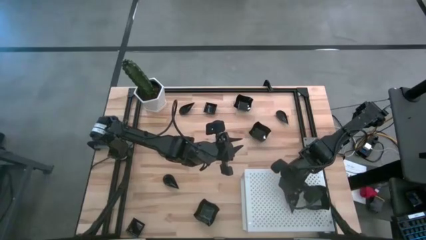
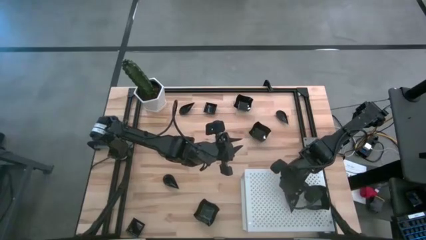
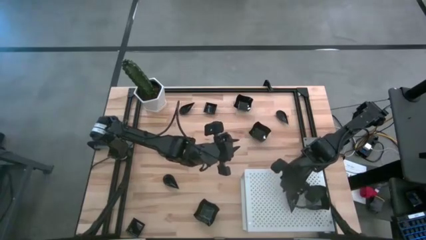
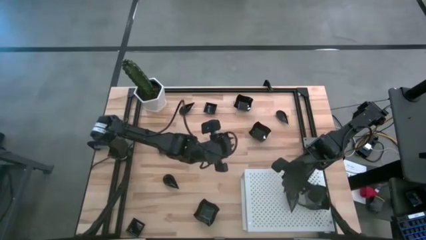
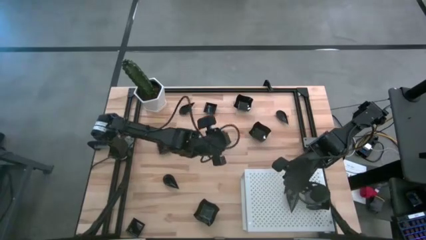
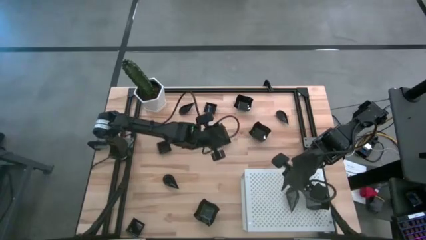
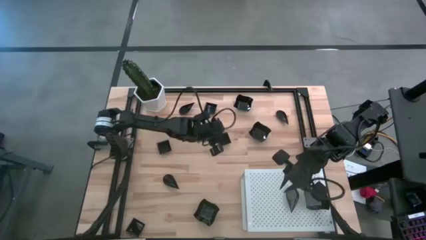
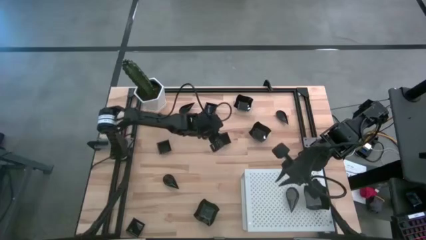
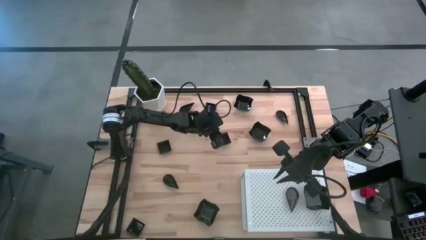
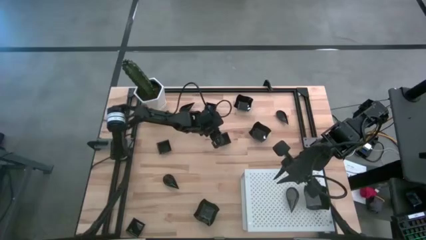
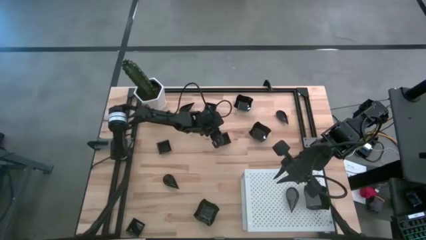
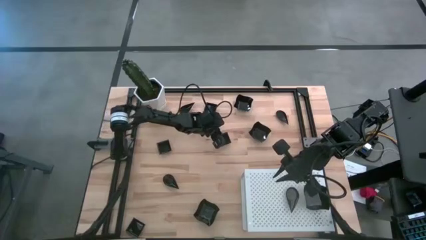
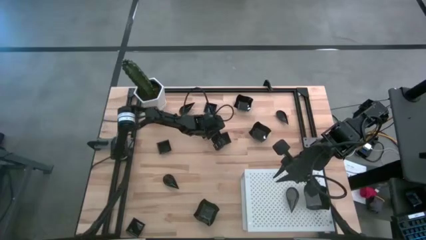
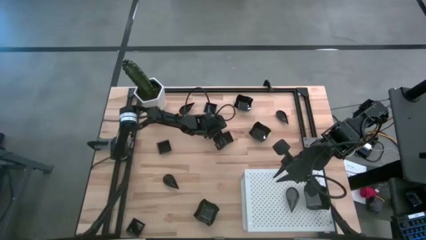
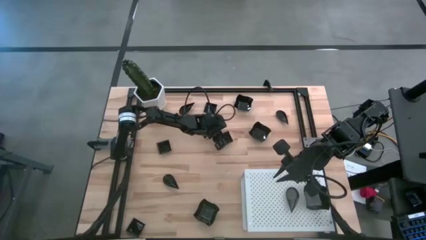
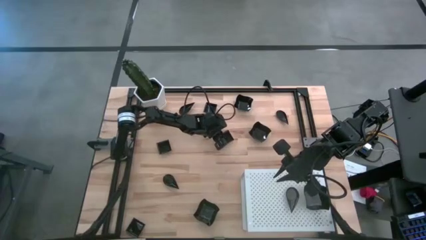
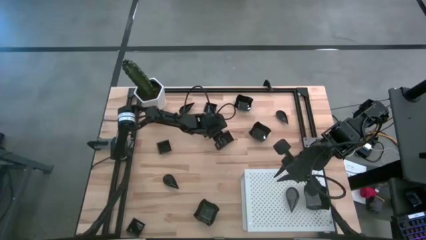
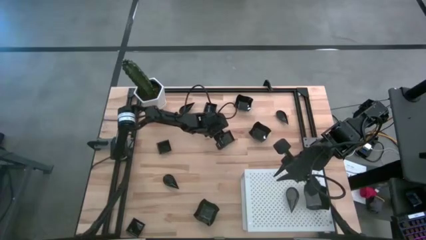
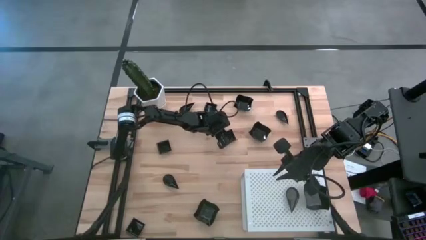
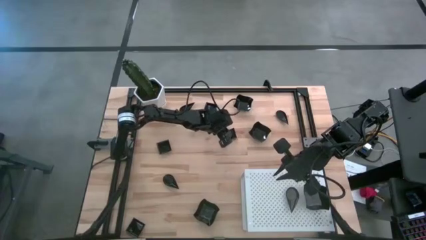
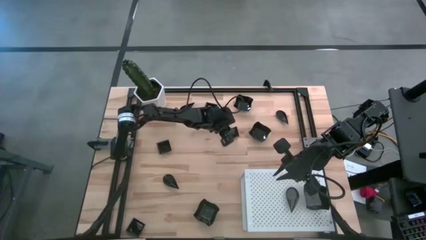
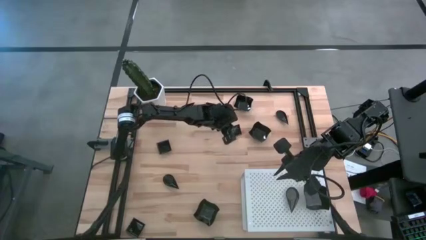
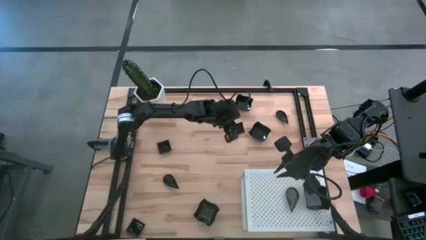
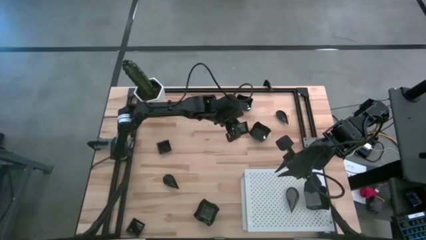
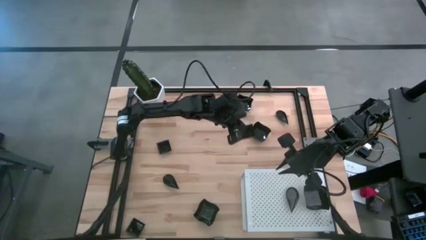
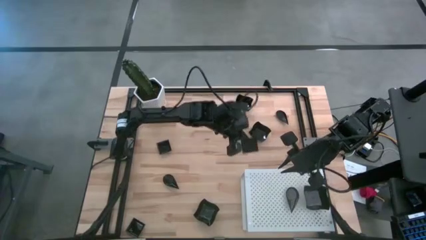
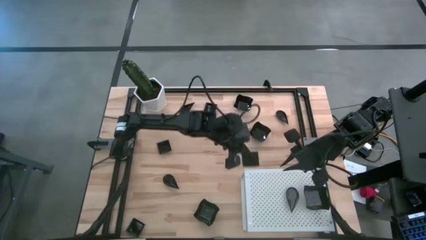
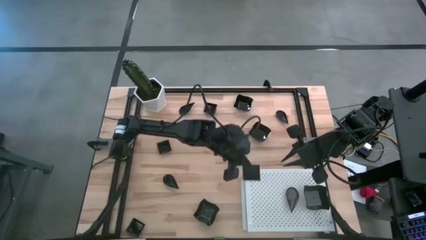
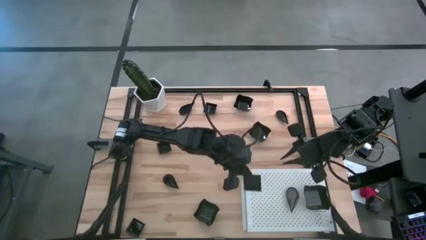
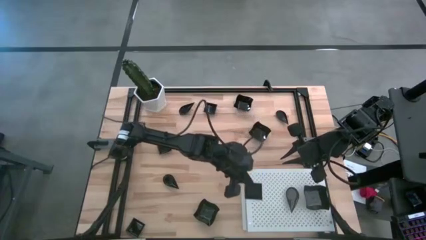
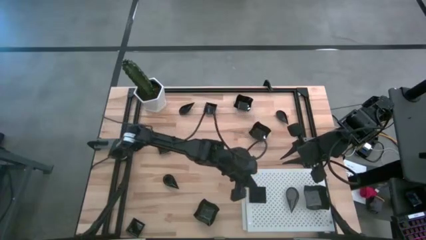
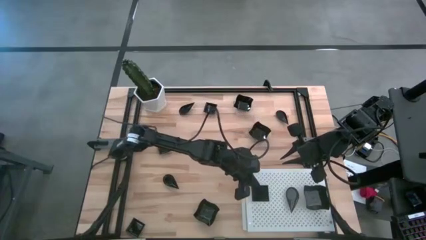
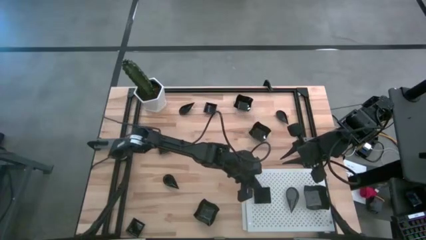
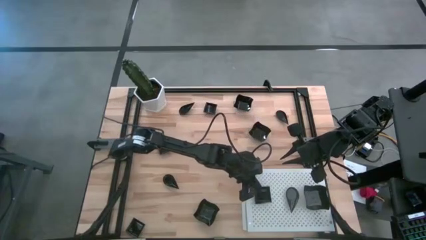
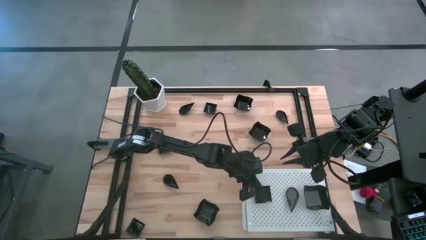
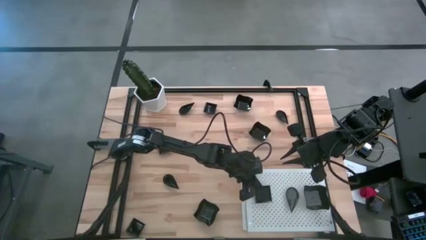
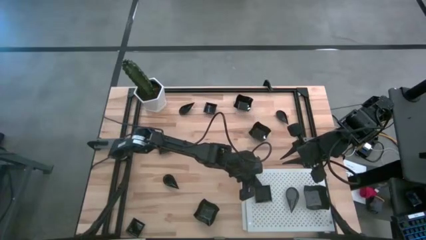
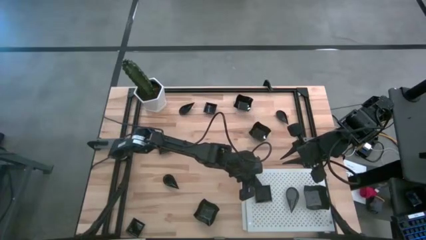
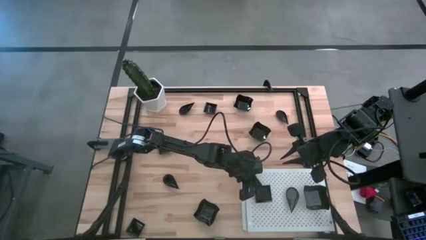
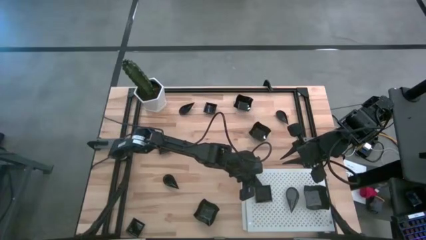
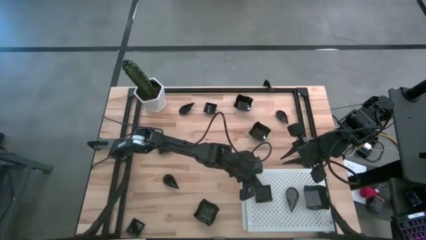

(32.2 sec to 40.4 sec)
Task: Pick & Place Mini shaped plates
Put the square plate on the shelf

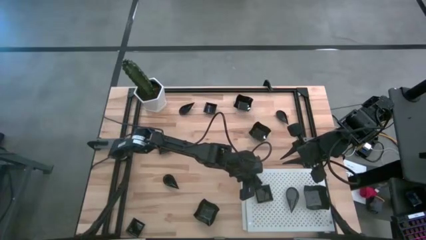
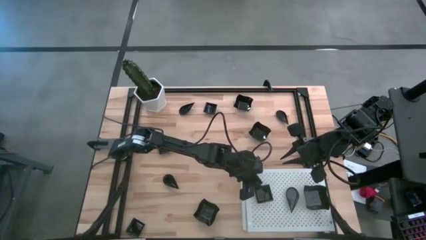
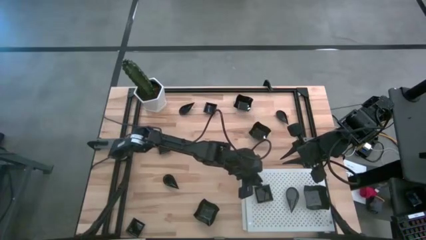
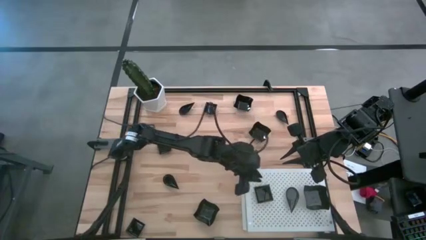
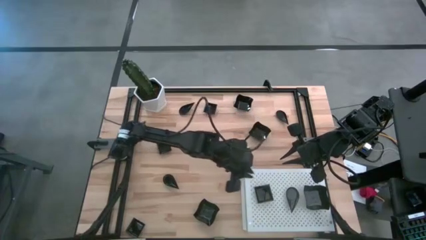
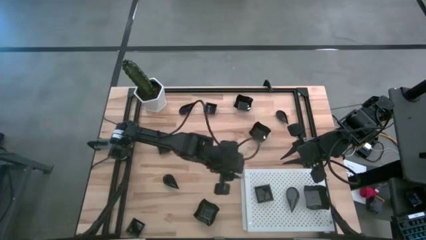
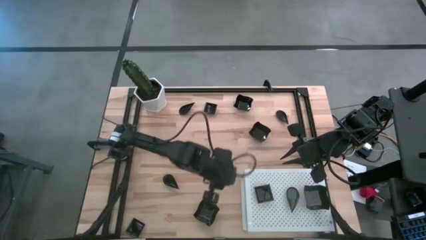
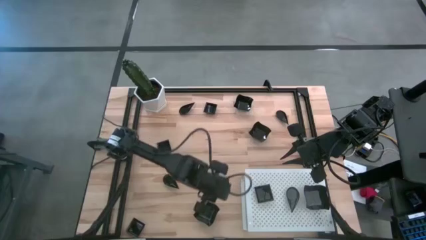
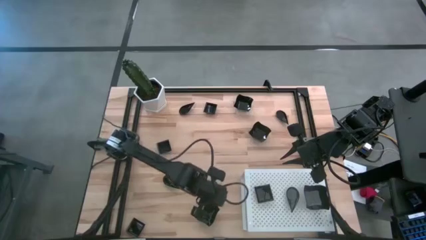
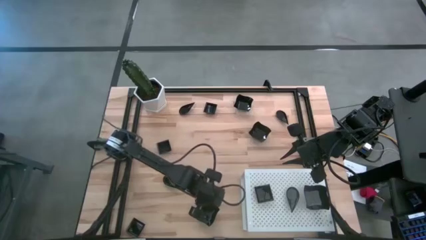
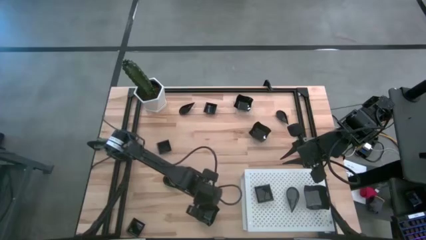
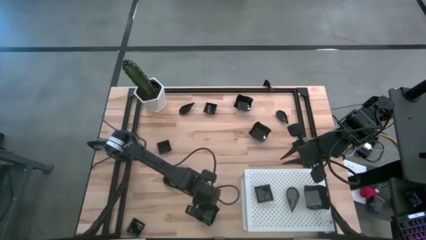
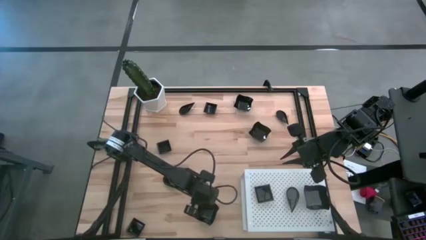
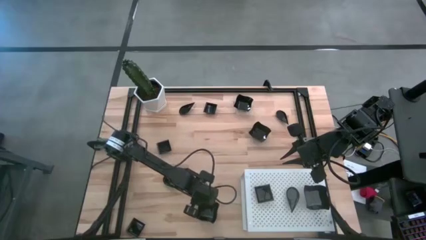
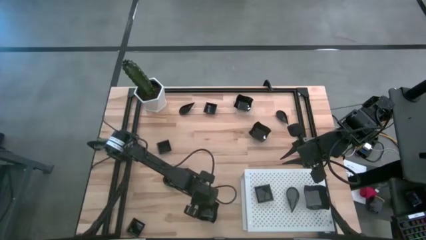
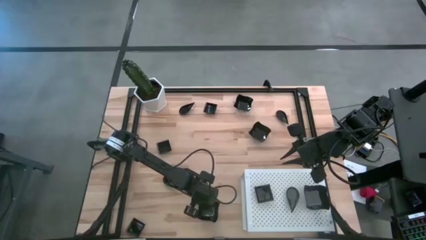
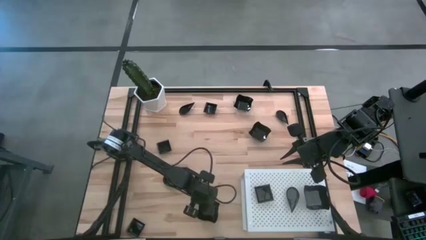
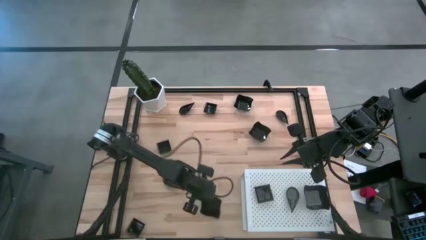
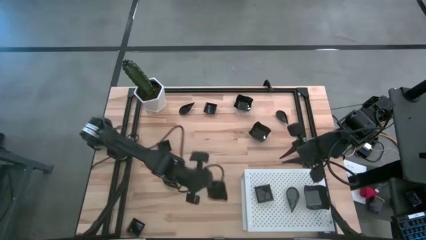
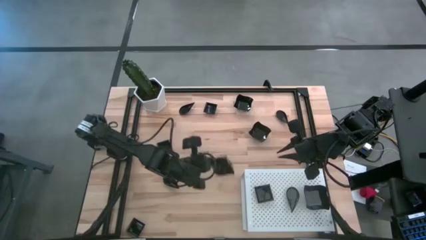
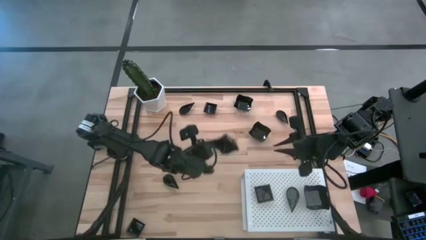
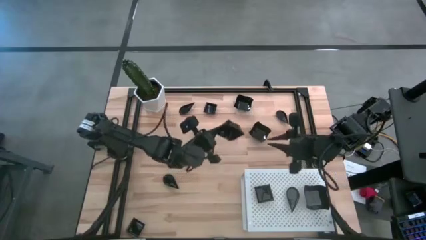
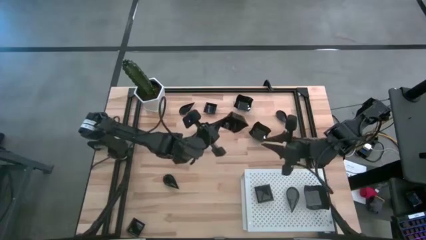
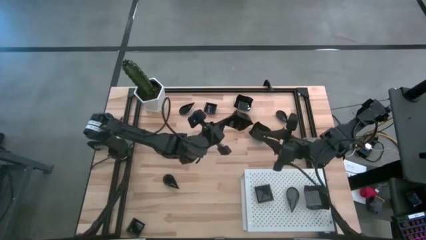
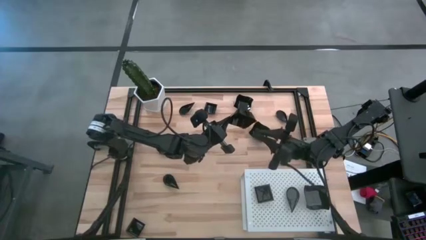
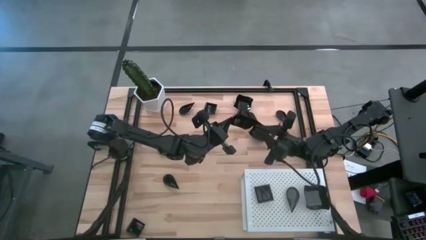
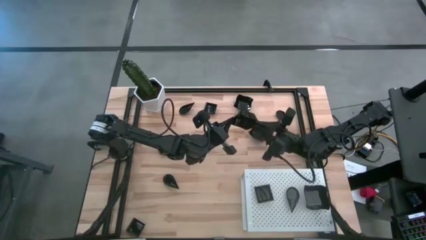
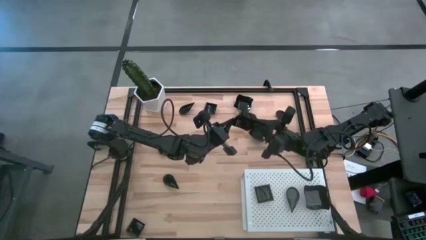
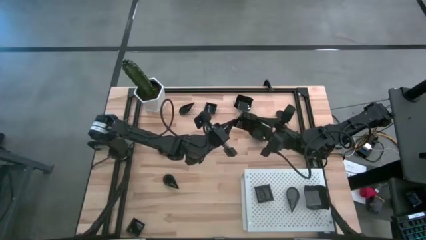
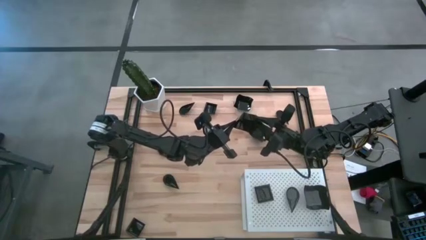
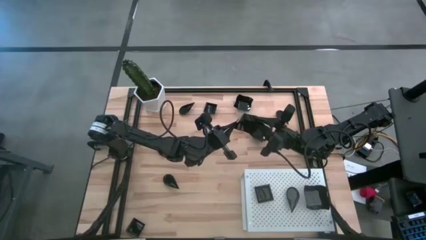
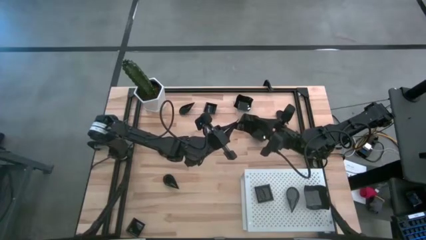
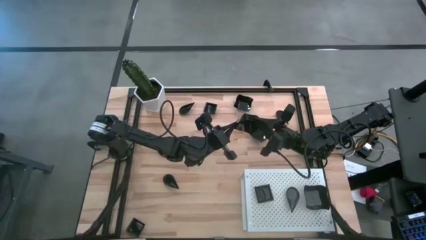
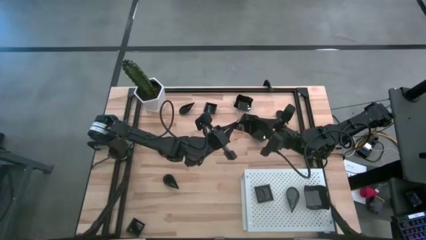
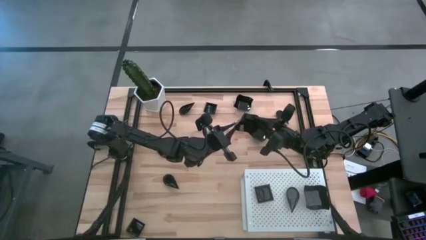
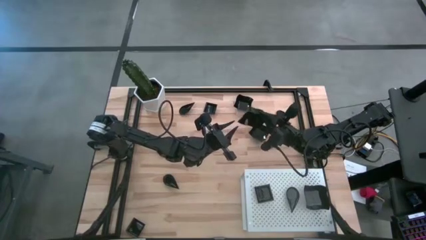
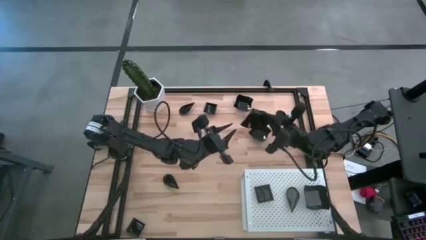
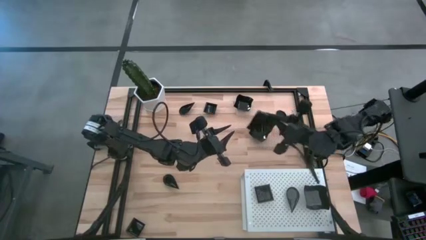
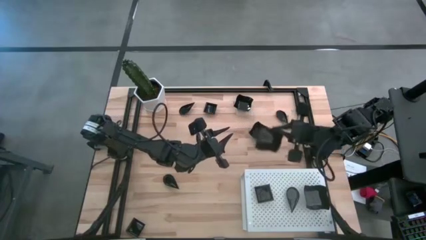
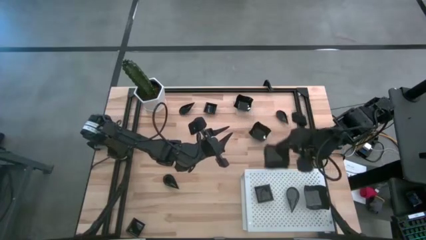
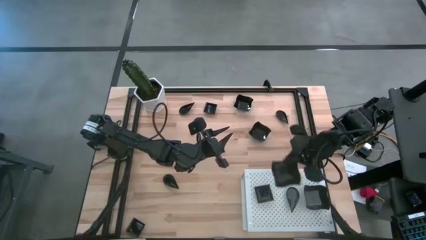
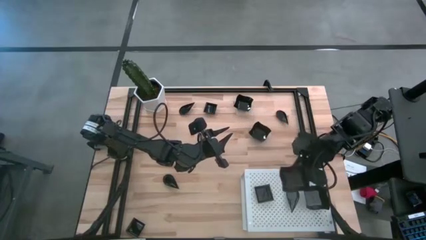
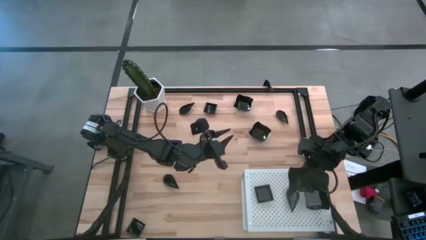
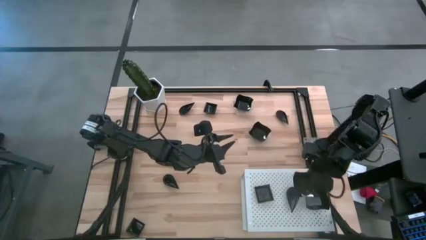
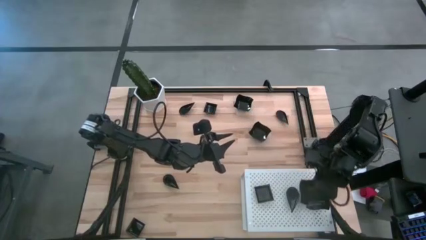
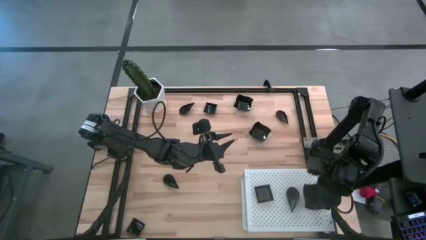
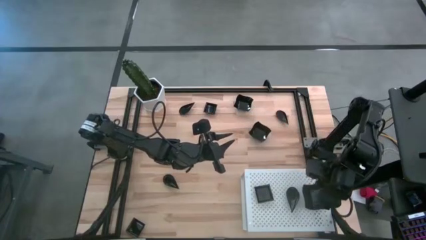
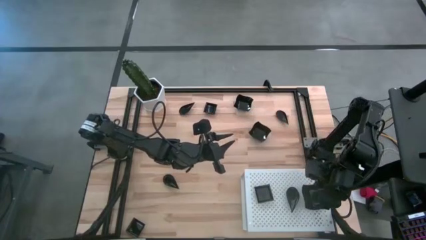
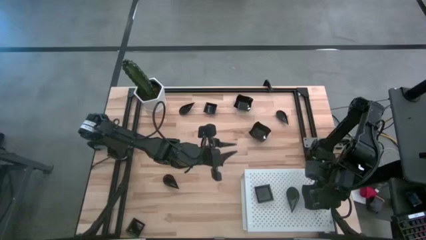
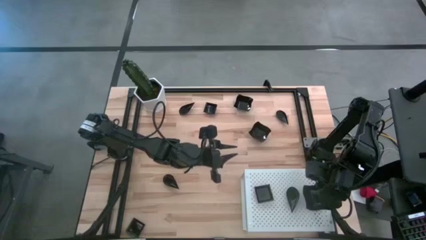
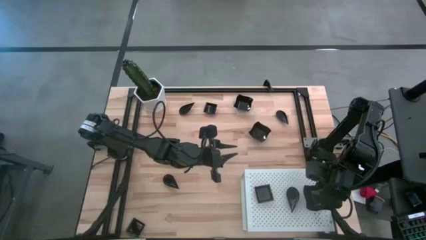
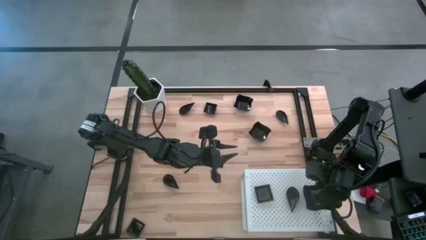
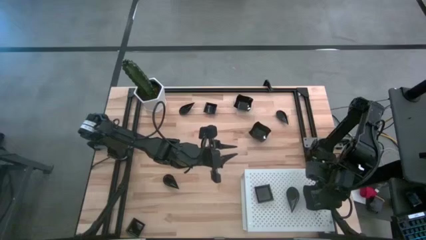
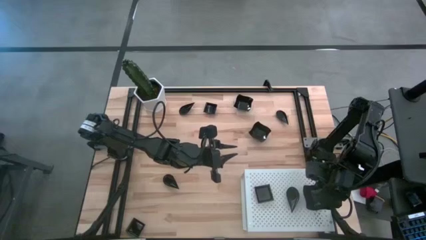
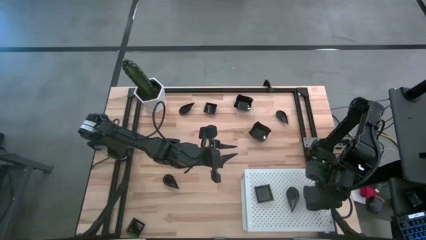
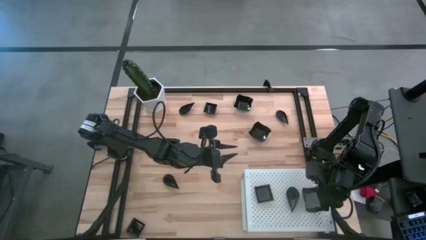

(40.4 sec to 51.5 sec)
Stack the distorted square plate on top of the other distorted square plate on the shelf
